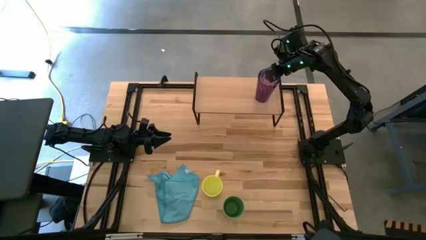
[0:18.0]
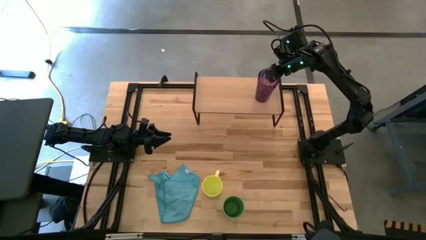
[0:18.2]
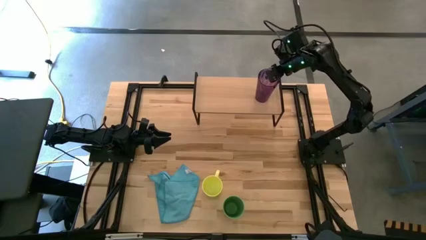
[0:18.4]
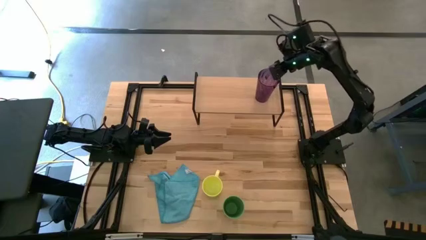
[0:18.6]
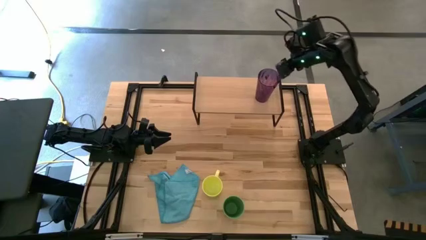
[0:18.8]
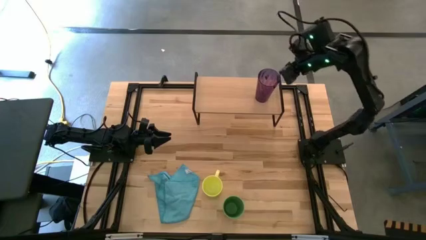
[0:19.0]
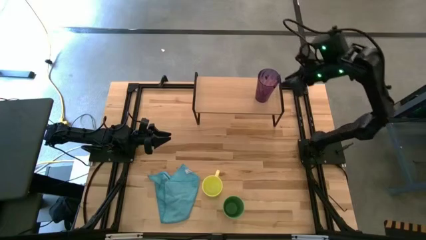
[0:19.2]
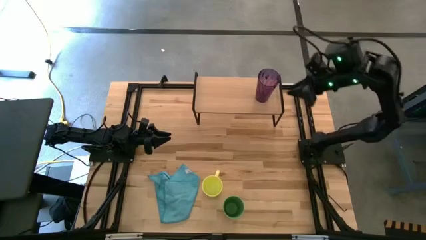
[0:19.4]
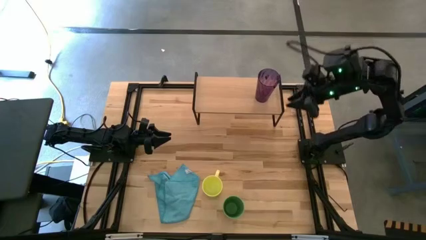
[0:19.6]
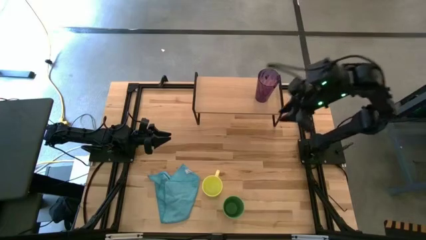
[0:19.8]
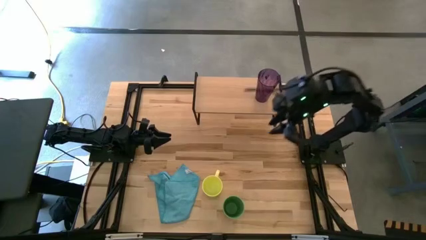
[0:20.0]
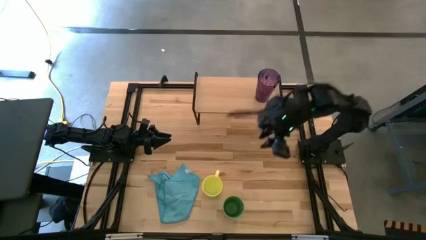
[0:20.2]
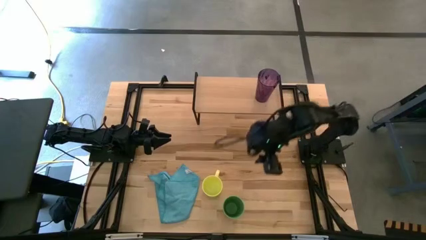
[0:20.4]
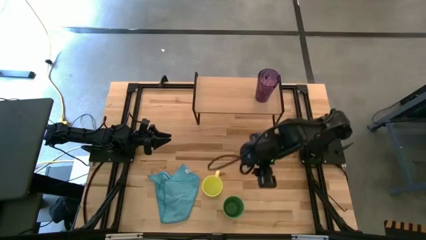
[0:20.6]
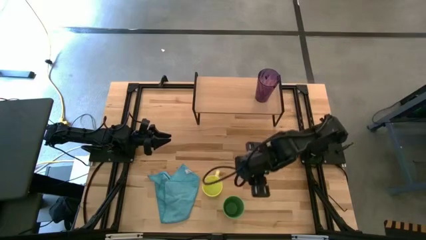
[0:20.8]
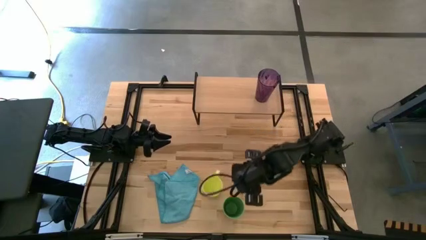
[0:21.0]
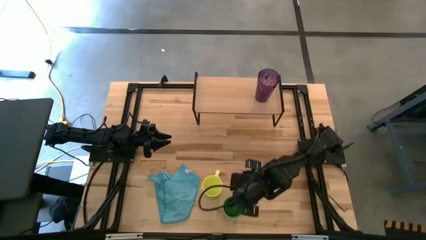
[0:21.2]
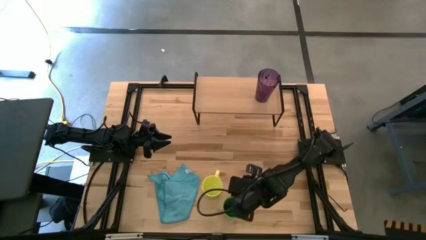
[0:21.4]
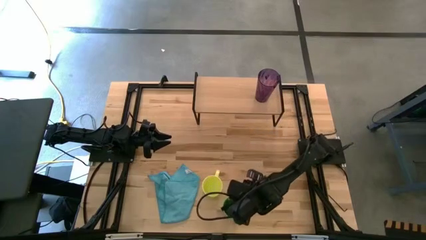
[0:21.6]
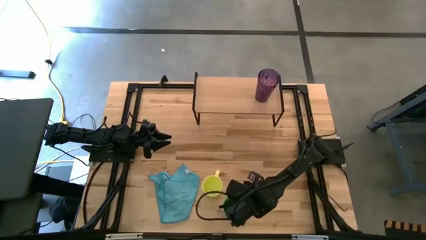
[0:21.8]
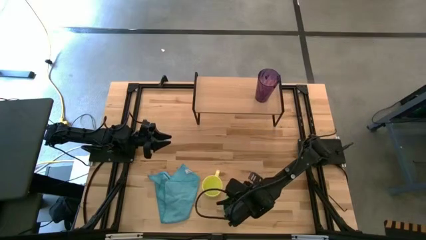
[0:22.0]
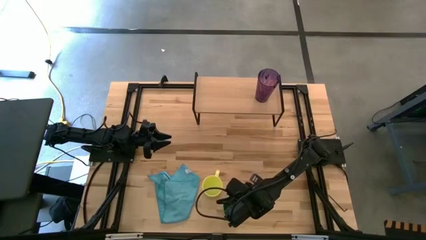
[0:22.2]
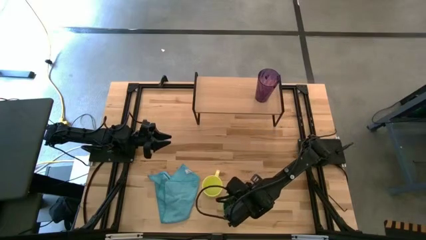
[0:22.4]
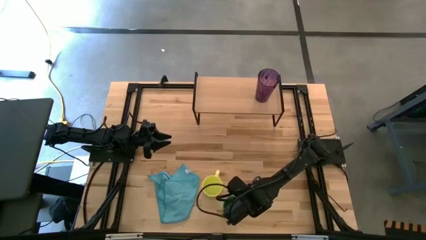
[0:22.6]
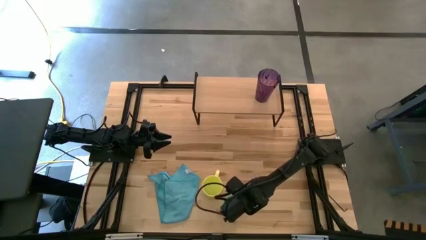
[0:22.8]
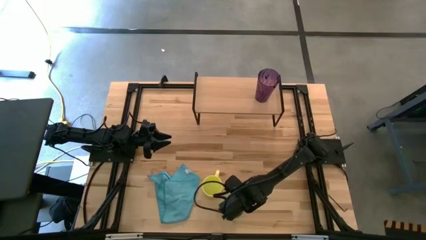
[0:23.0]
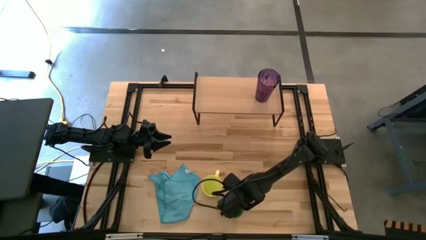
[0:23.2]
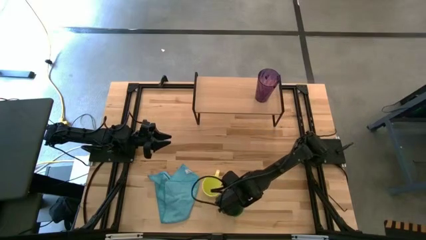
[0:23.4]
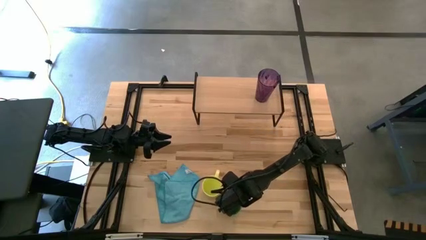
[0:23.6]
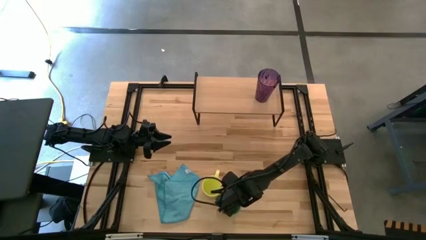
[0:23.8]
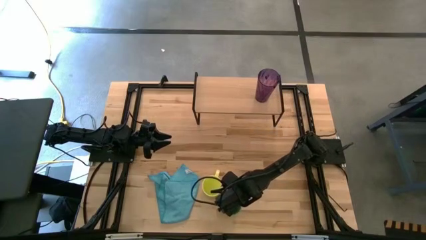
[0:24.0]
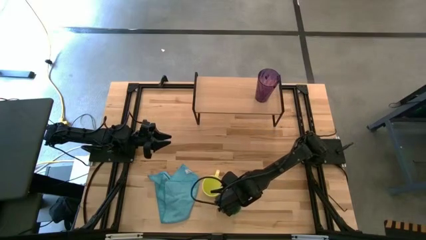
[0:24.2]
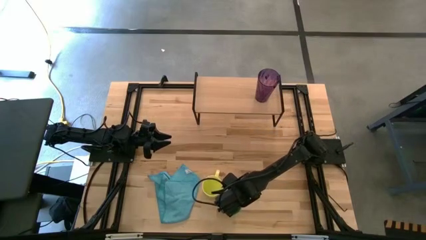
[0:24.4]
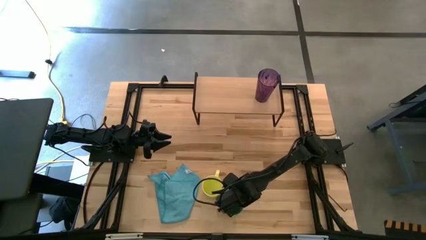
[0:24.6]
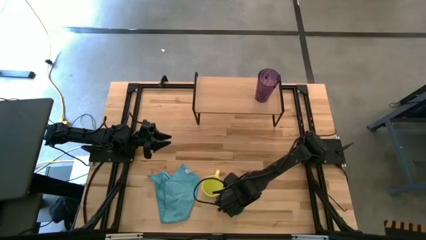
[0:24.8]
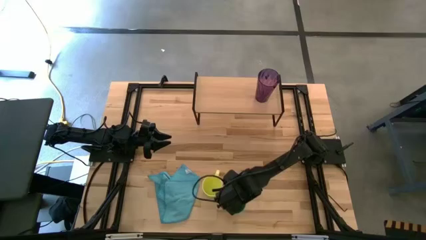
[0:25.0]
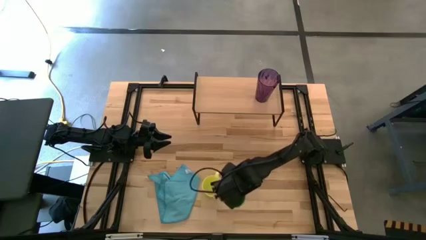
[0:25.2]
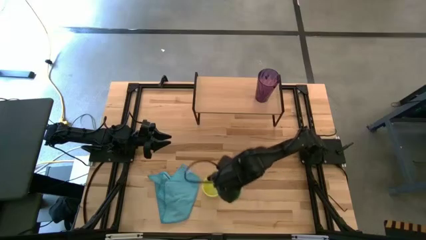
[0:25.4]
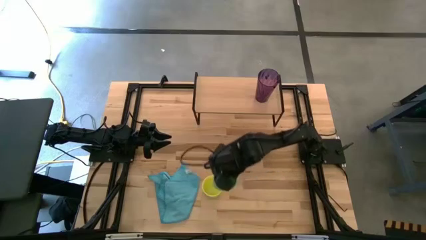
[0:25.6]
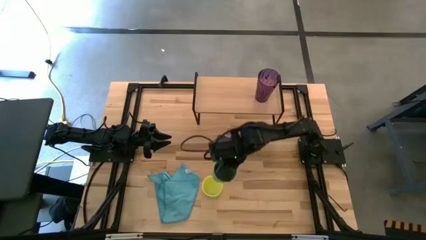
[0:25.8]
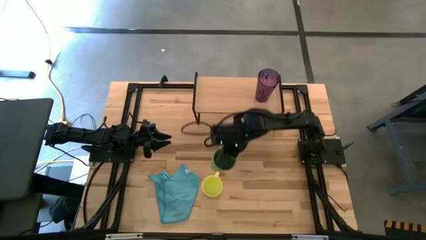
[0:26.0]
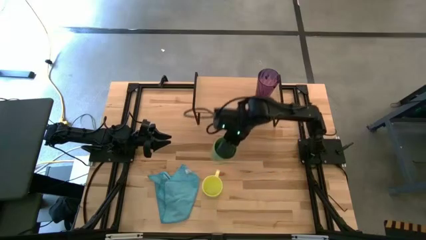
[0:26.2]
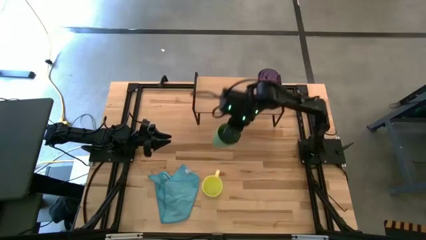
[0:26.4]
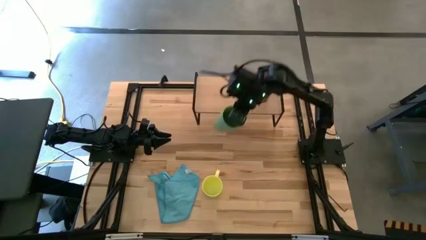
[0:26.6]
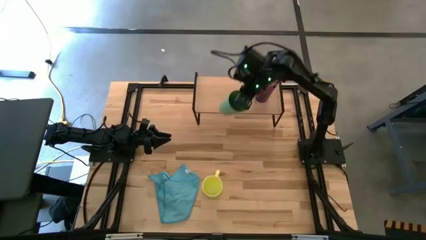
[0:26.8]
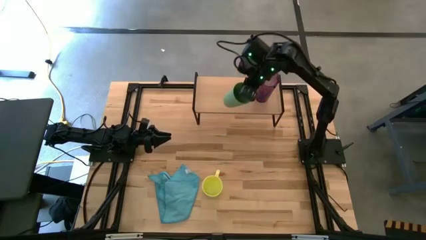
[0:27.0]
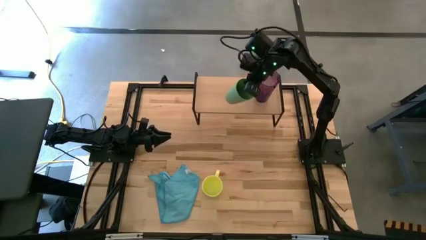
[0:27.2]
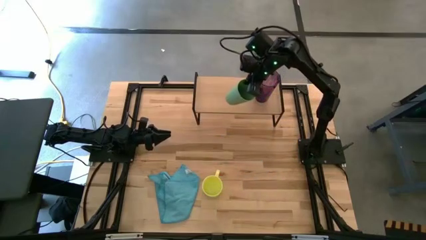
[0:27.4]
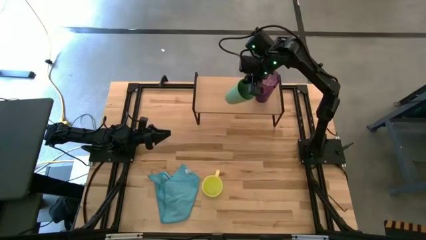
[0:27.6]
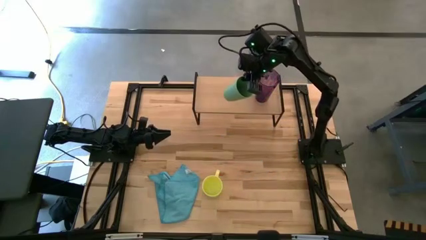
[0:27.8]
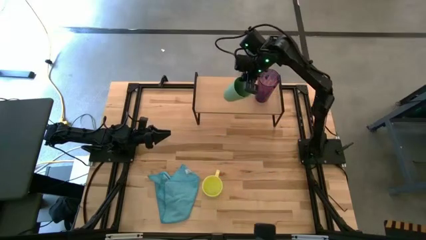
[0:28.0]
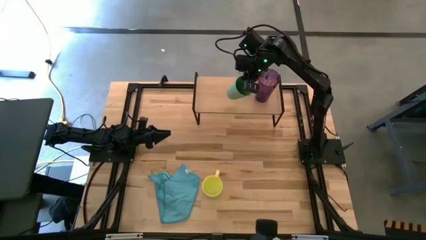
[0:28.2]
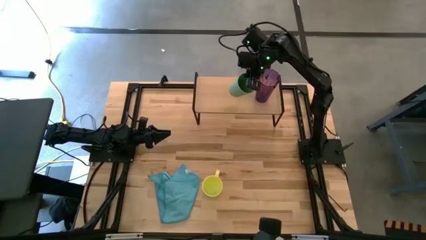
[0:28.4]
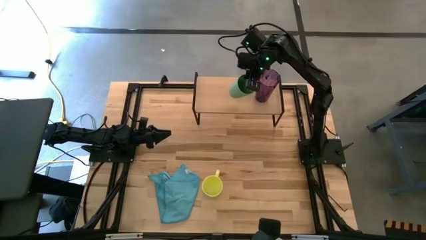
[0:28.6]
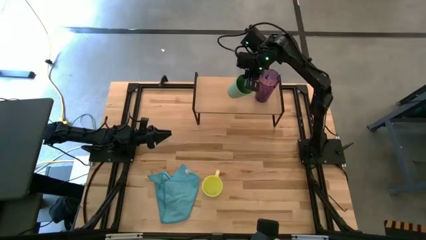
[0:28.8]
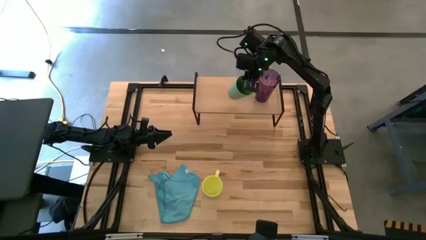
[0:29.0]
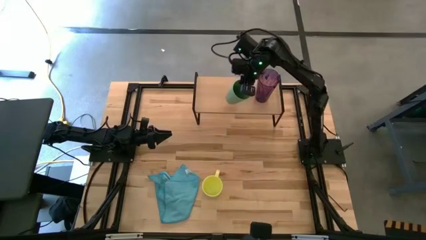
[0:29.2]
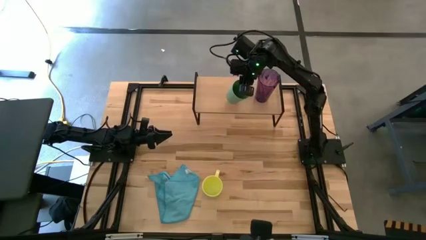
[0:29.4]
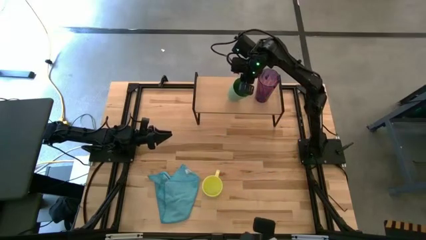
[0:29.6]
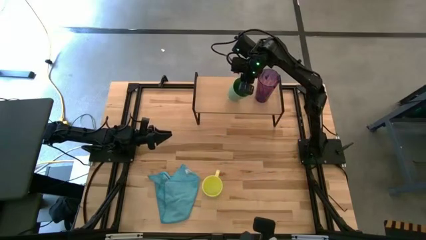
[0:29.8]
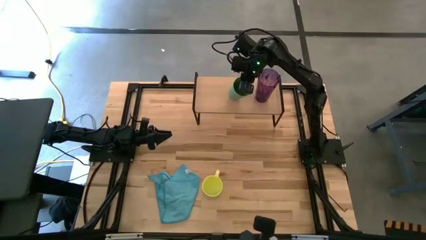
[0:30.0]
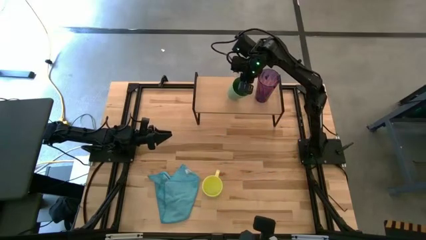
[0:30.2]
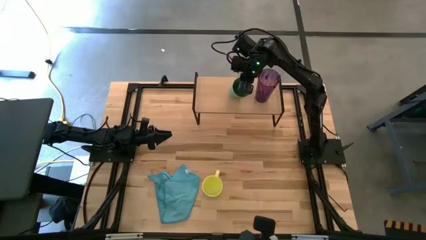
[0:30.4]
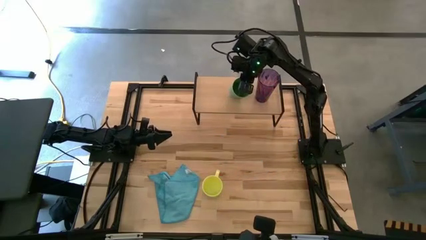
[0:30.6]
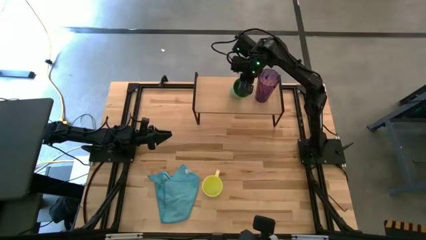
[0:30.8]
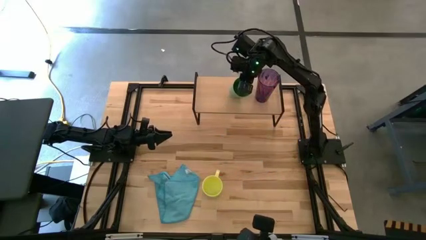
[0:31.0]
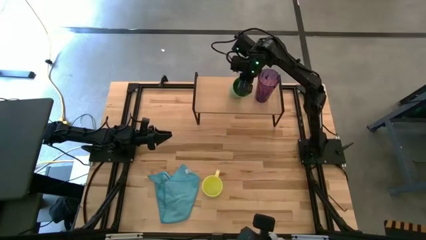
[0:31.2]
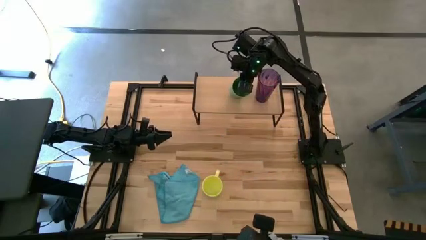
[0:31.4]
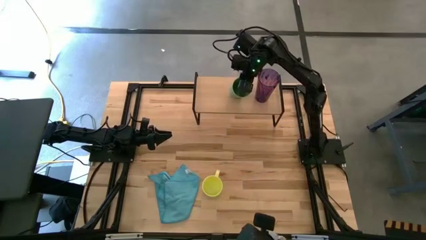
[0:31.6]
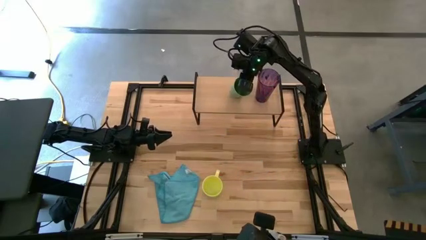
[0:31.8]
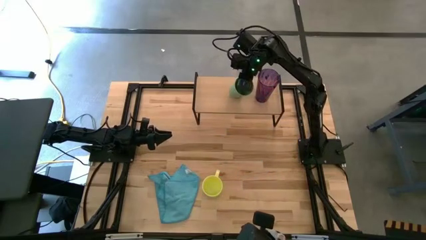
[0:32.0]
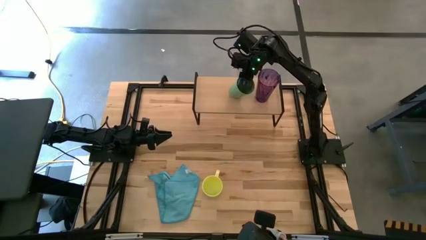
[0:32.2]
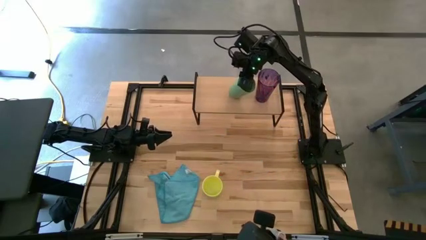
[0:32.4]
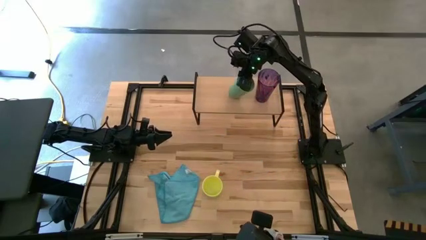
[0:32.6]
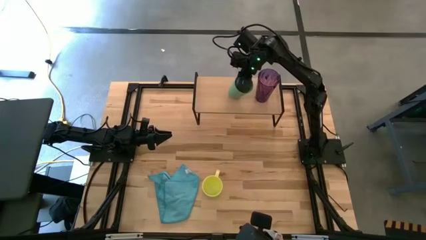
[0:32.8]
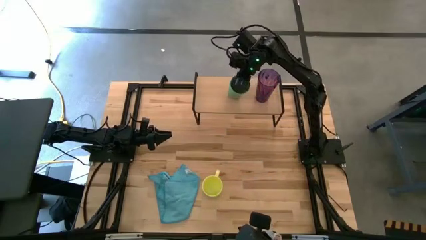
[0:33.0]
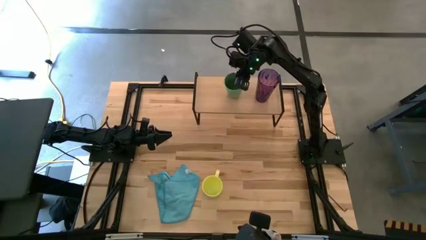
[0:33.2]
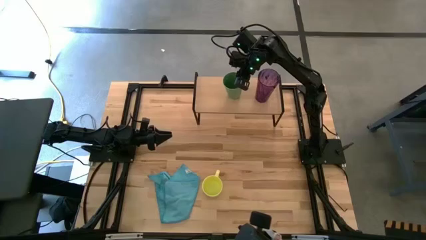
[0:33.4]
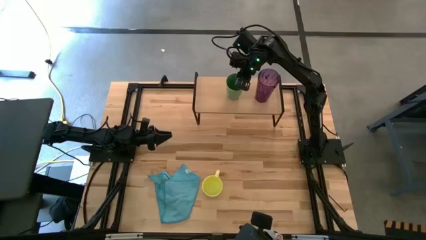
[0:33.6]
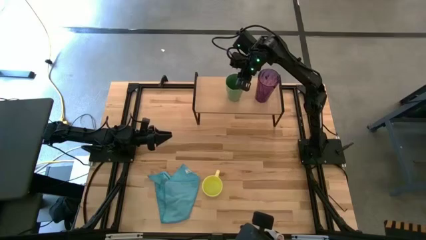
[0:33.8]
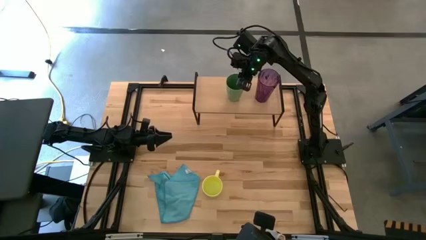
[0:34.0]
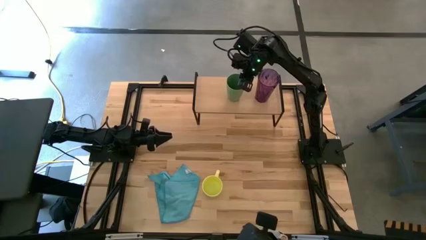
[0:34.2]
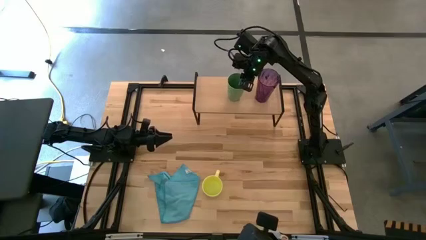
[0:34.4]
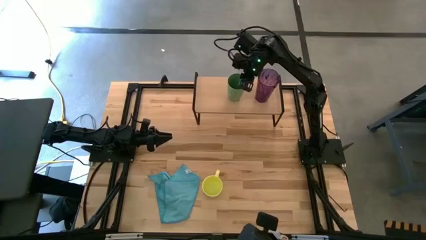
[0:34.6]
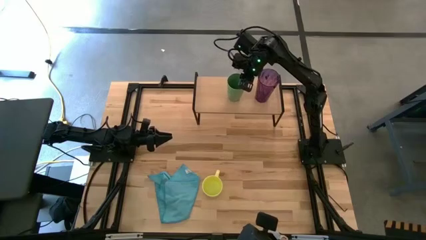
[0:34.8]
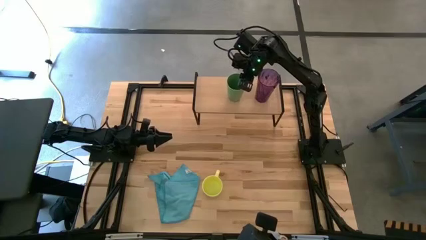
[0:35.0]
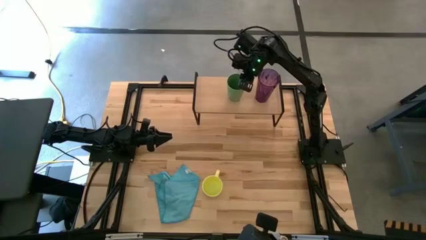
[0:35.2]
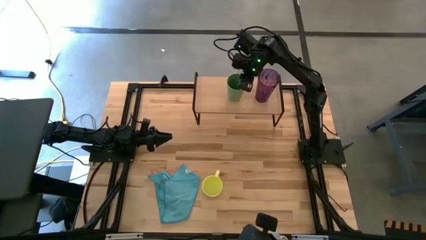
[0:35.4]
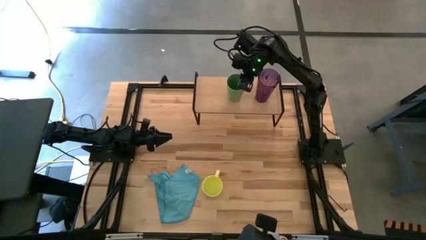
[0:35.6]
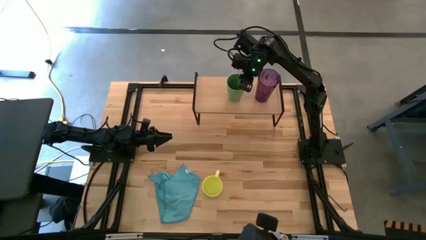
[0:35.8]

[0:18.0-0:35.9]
Task: Stack small to large cups/mugs on shelf
Put the green cup on the shelf
